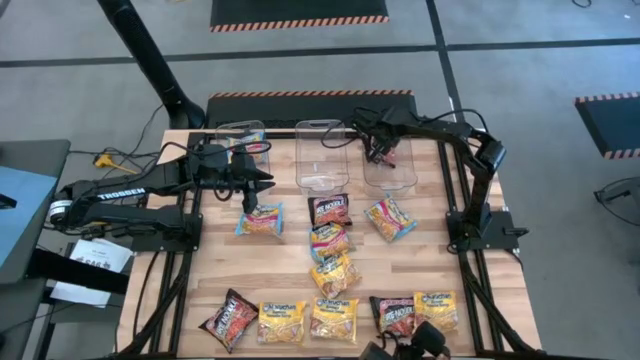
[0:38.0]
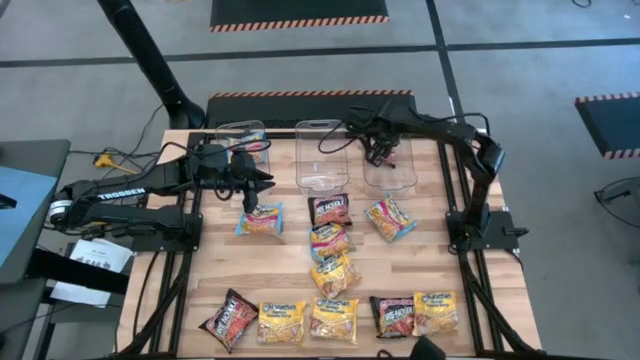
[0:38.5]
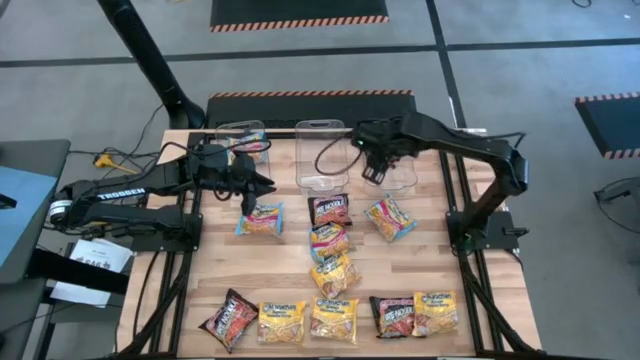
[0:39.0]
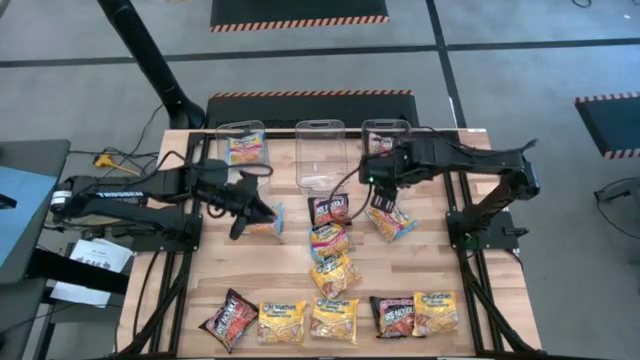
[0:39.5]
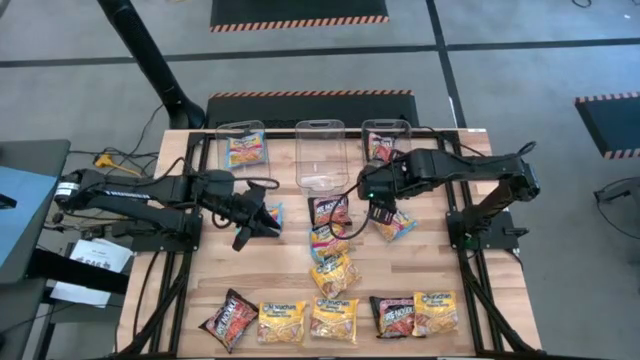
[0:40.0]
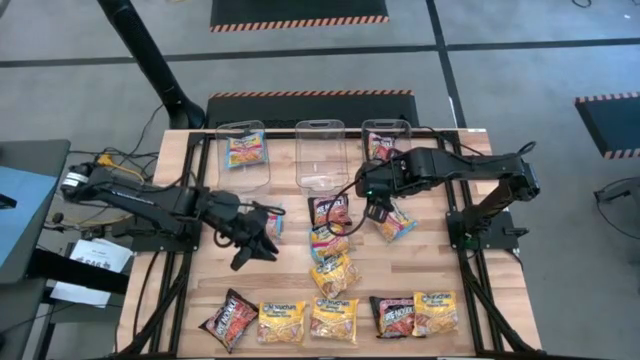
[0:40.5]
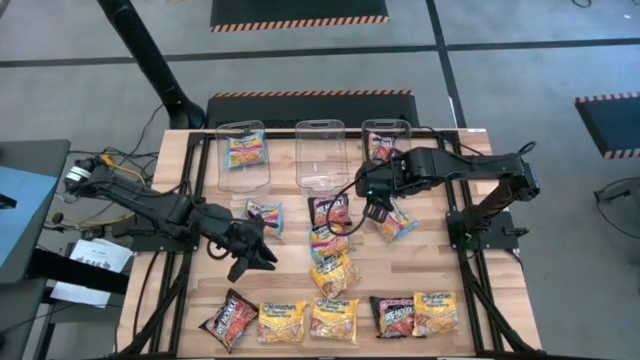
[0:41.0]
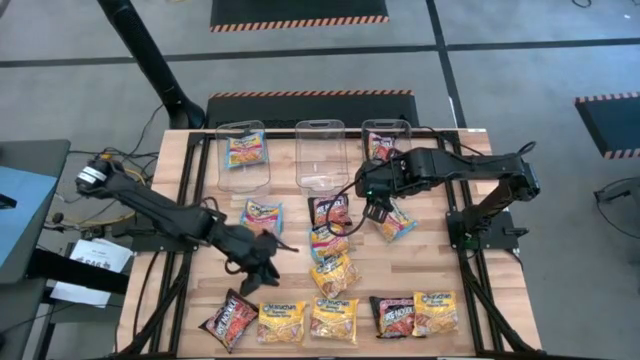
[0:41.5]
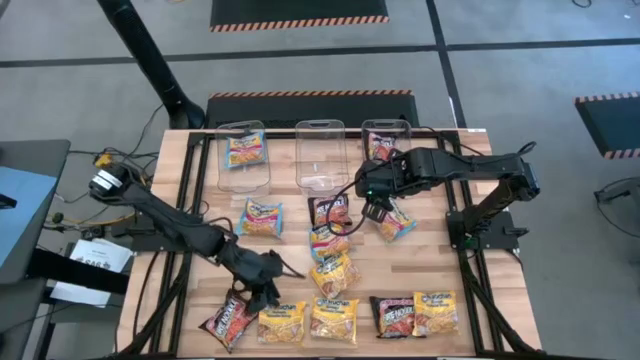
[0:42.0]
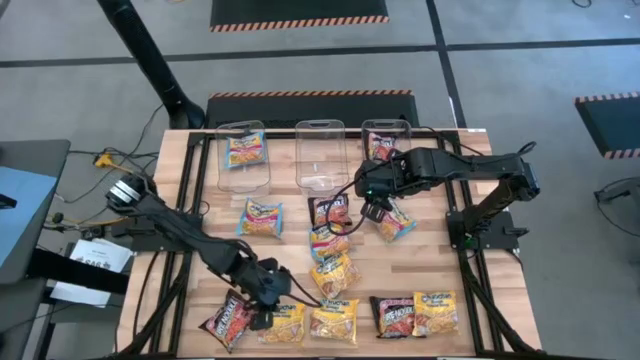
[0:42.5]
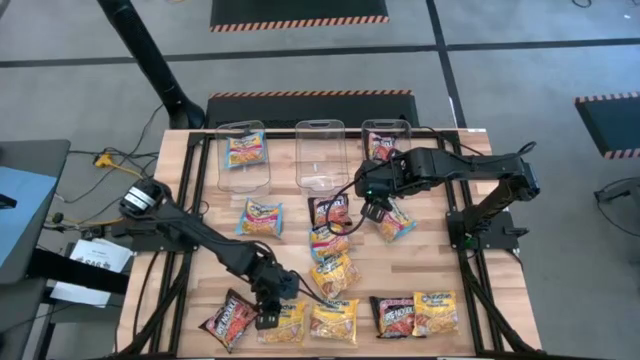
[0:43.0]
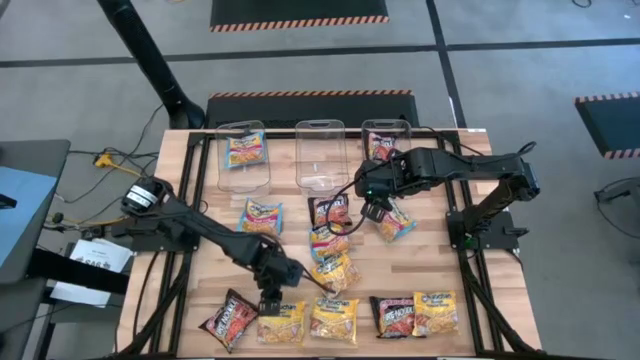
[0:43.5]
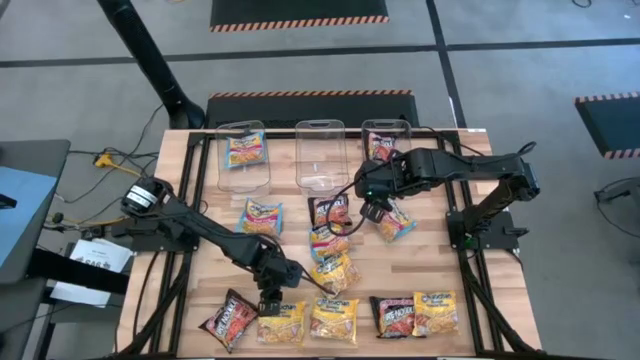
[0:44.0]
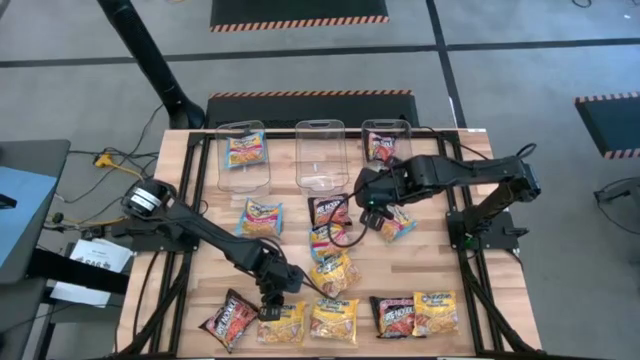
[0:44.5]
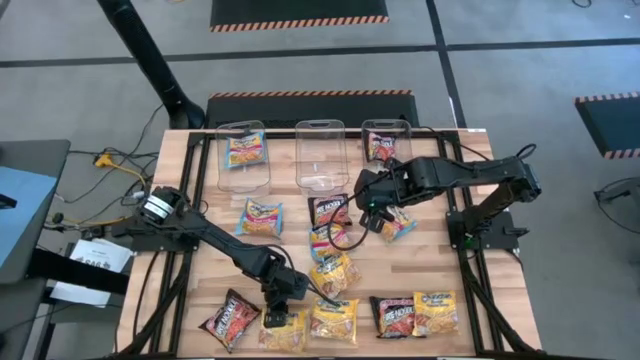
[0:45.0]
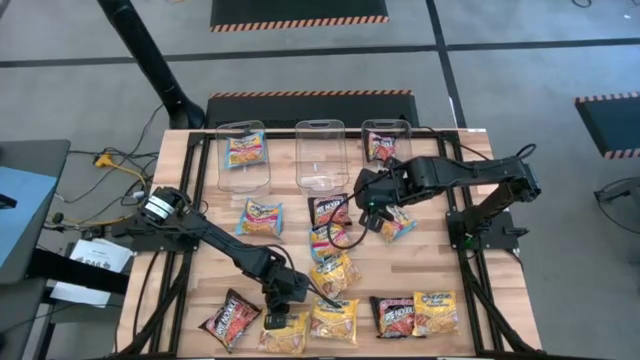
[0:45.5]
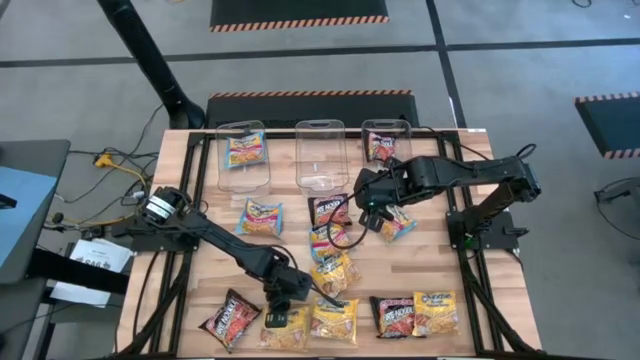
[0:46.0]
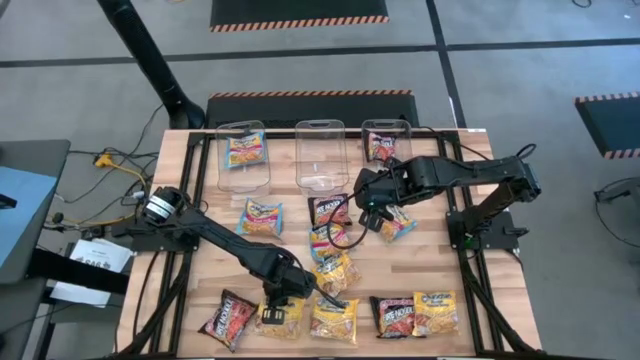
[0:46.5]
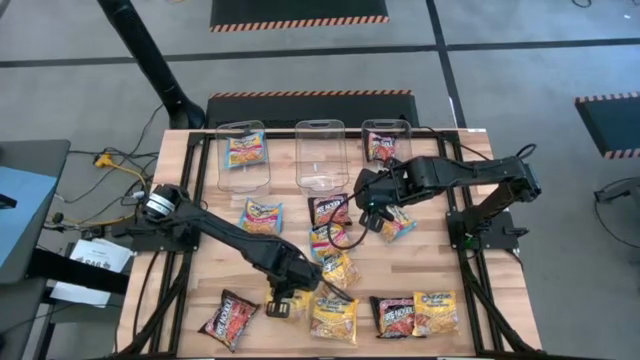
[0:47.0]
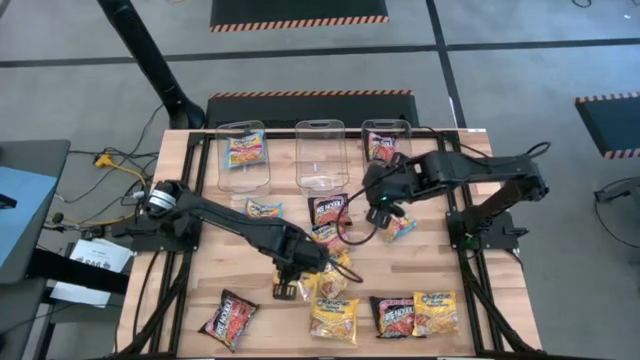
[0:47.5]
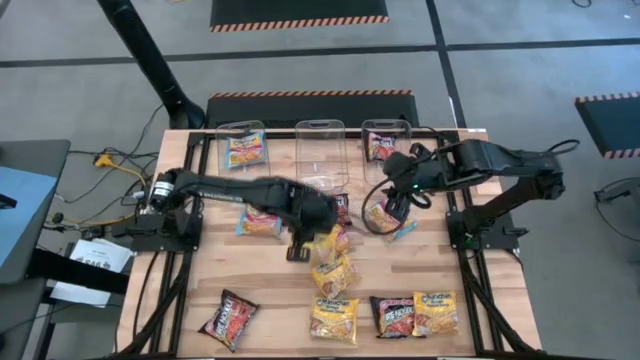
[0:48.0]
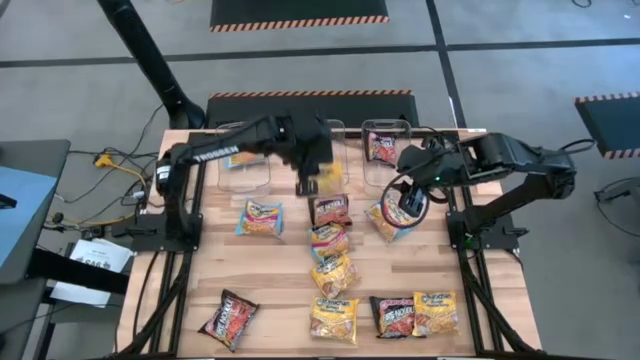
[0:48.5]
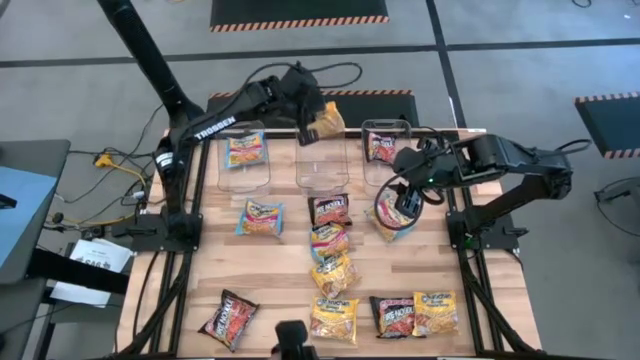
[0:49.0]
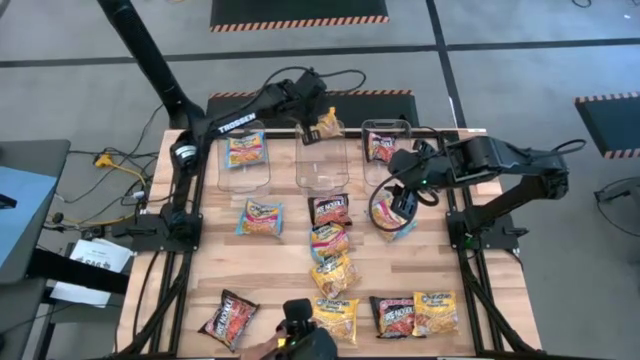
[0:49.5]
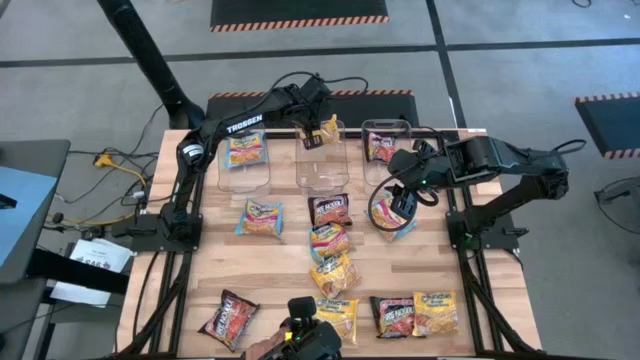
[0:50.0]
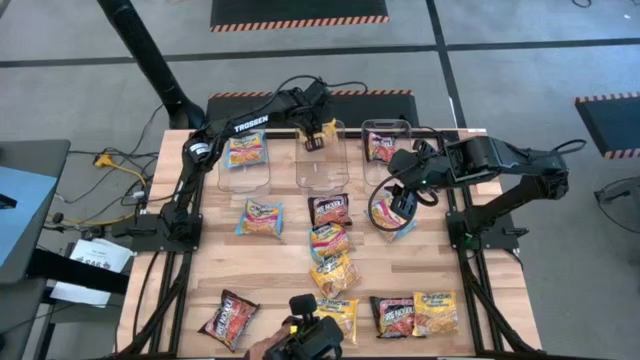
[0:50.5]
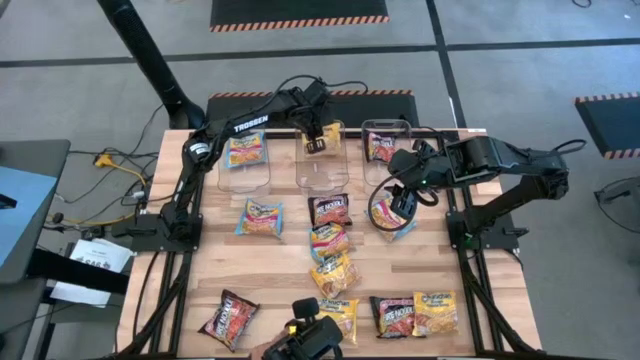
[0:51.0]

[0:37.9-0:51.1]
Task: Sort Maruchan noodles
Put the yellow noodle pack into the middle transparent bin

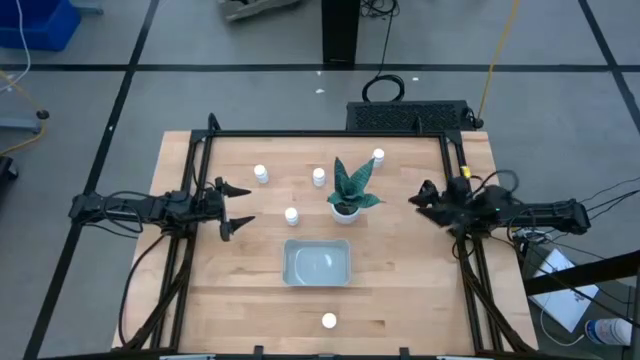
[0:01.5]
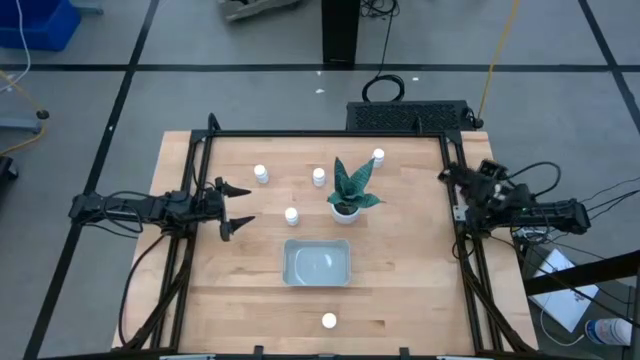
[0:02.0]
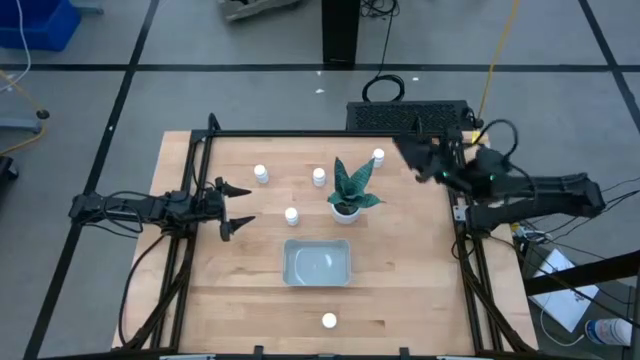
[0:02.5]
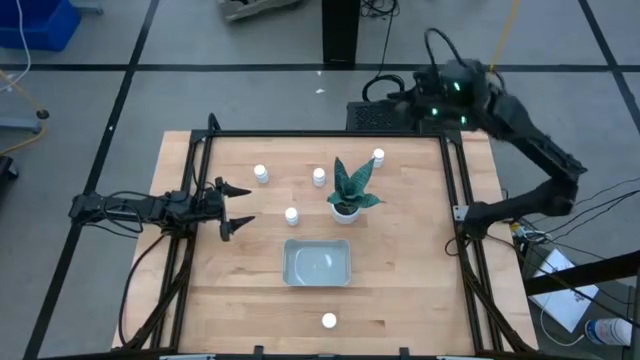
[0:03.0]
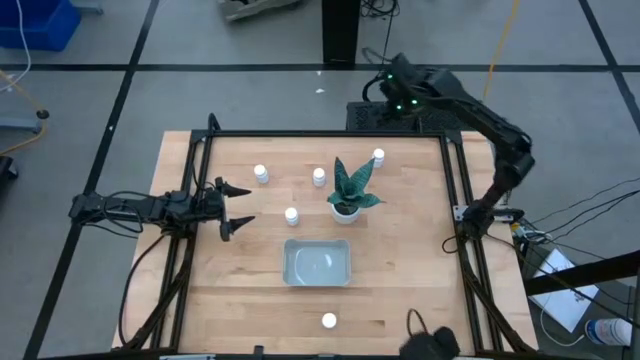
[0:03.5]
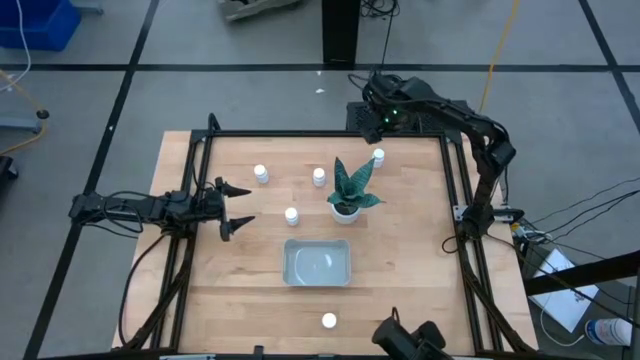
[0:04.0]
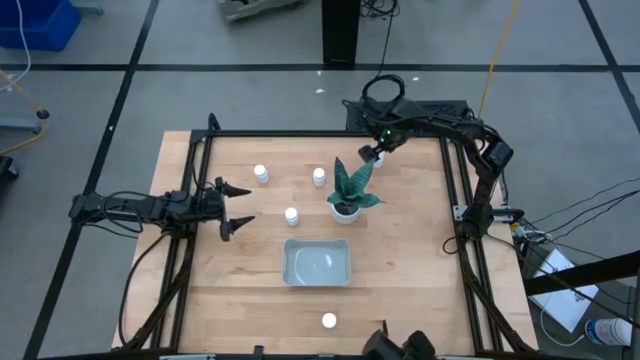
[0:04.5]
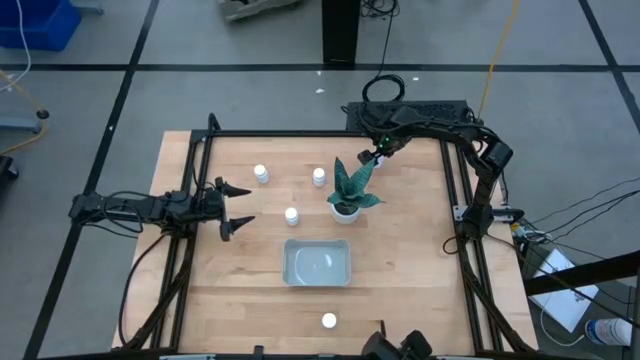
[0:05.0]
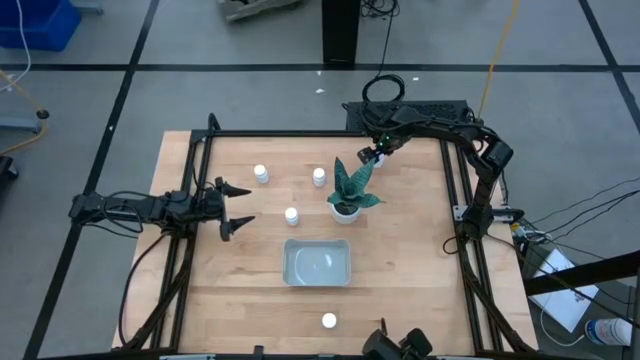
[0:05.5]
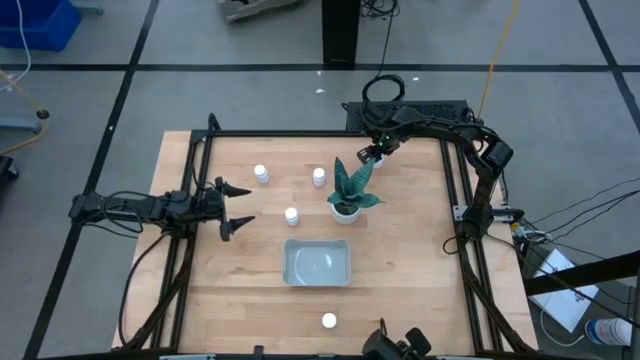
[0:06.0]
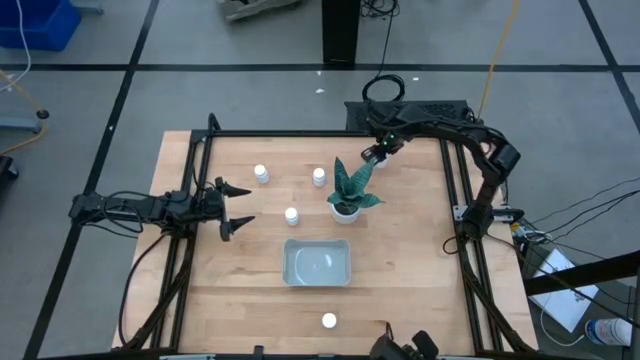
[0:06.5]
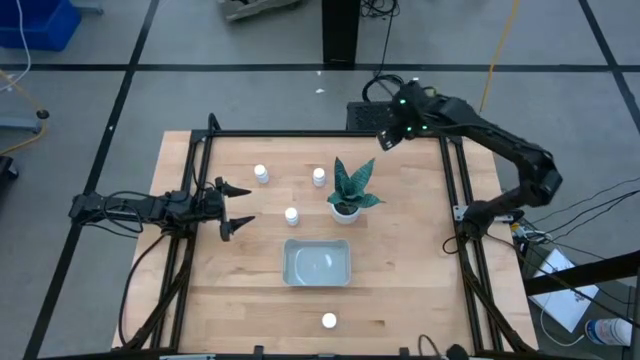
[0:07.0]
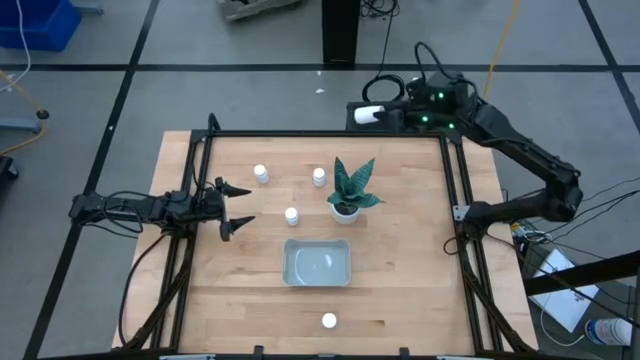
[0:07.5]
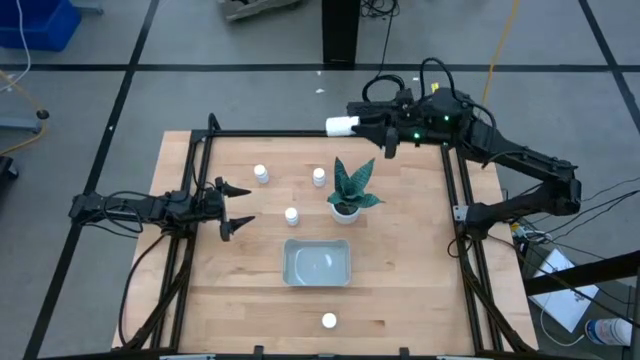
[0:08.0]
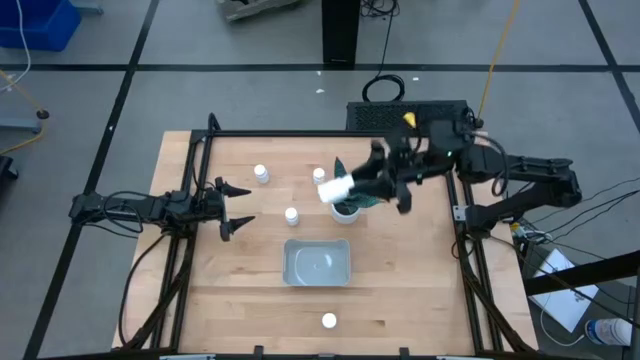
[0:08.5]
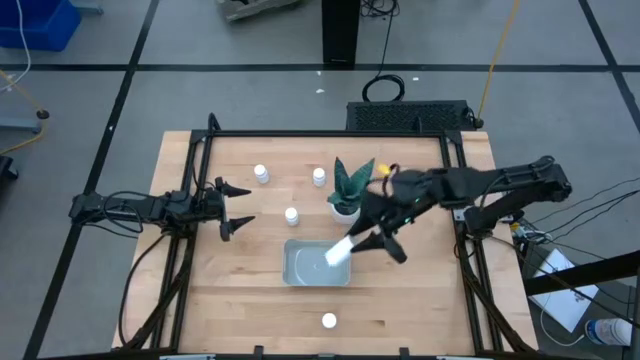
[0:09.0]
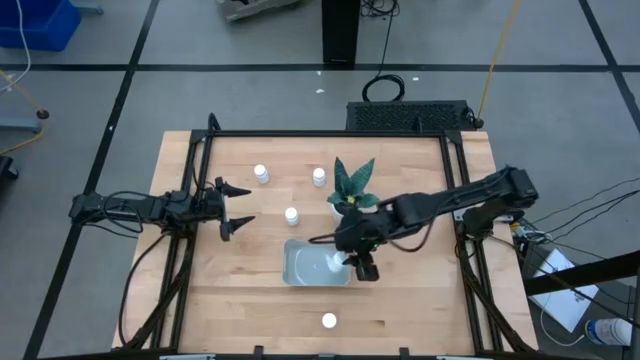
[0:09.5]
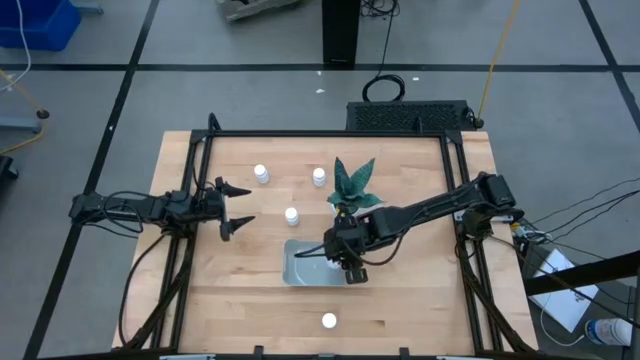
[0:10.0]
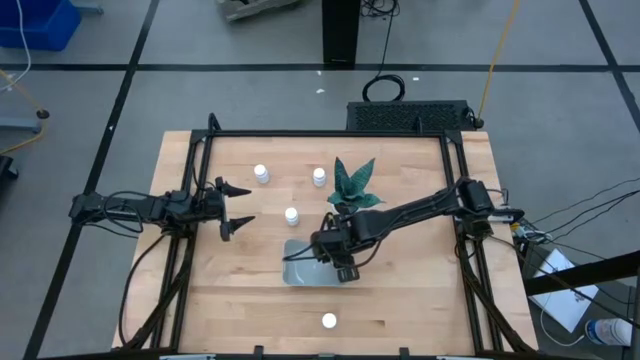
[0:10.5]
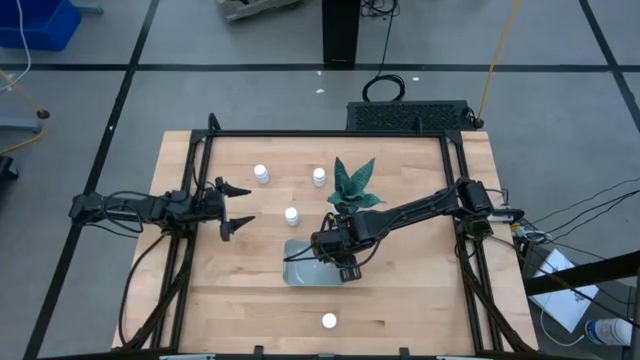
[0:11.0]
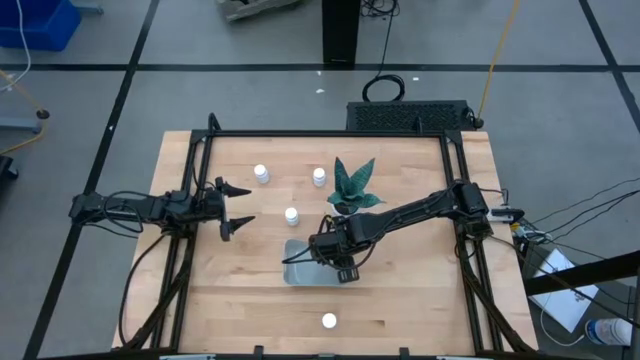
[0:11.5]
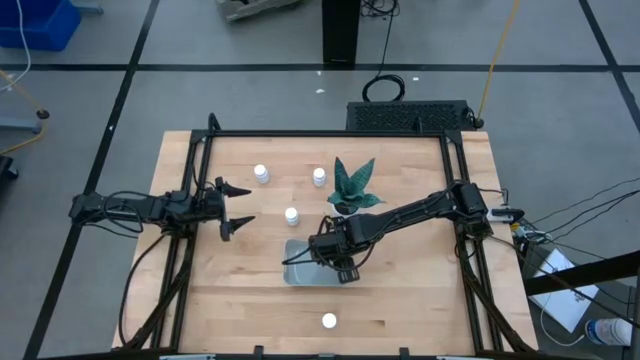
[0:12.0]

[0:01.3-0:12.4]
Task: Pick and place pill bottles into a basket
Put the white pill bottle into the white bin
